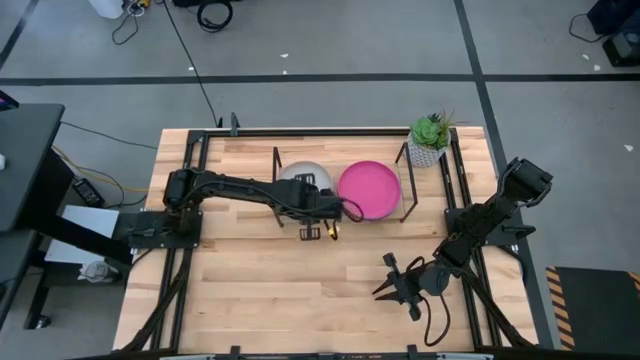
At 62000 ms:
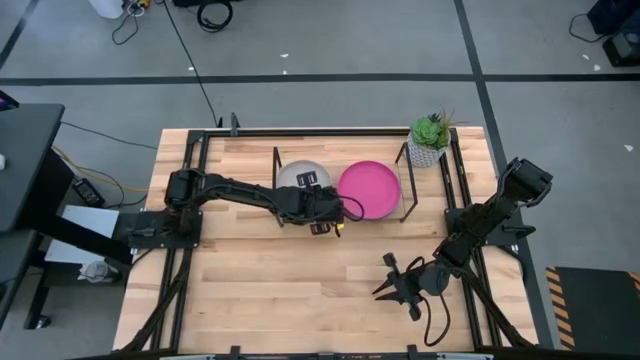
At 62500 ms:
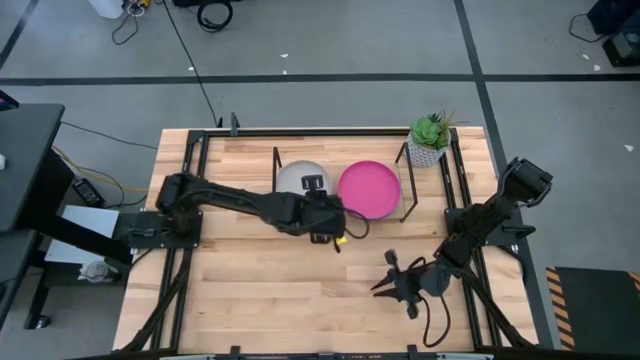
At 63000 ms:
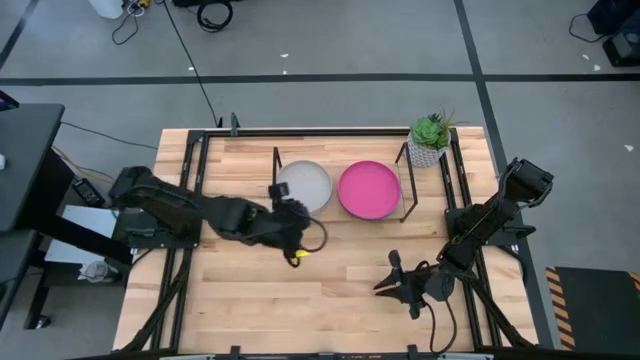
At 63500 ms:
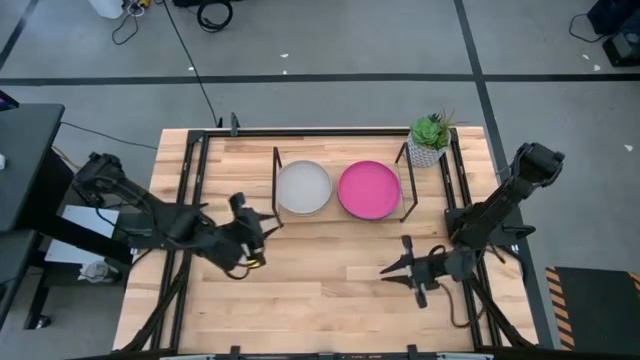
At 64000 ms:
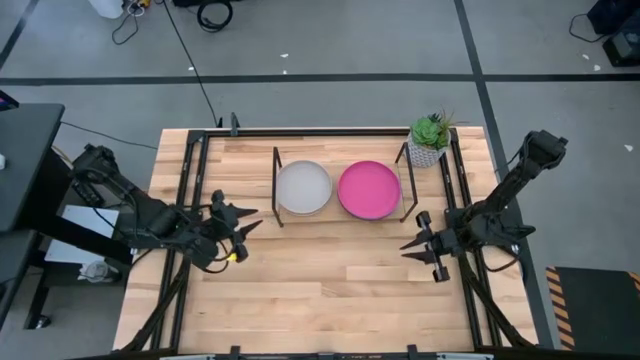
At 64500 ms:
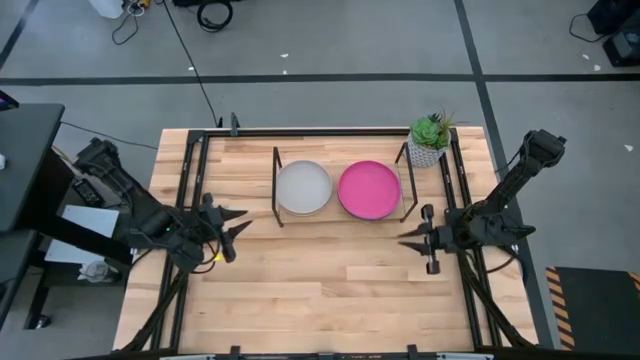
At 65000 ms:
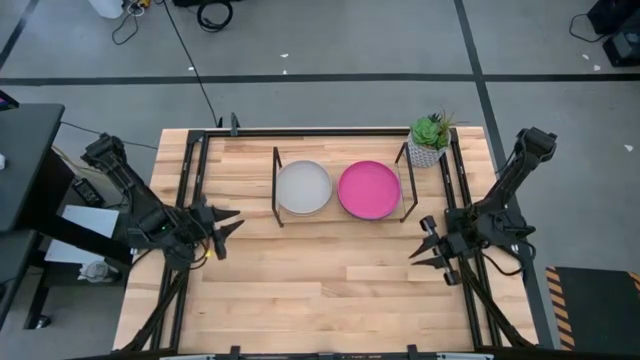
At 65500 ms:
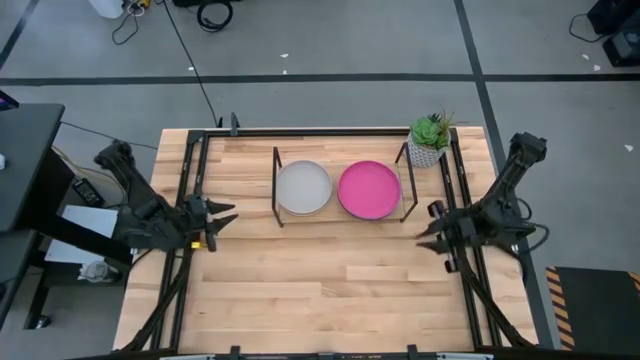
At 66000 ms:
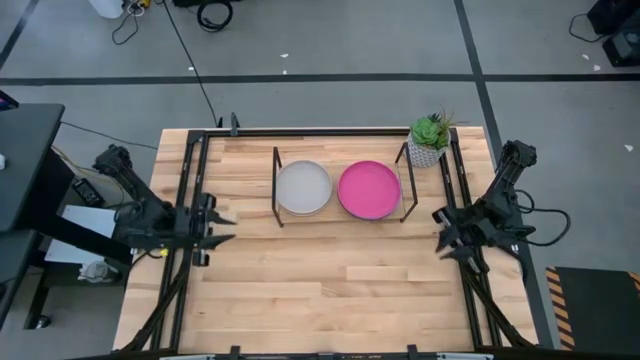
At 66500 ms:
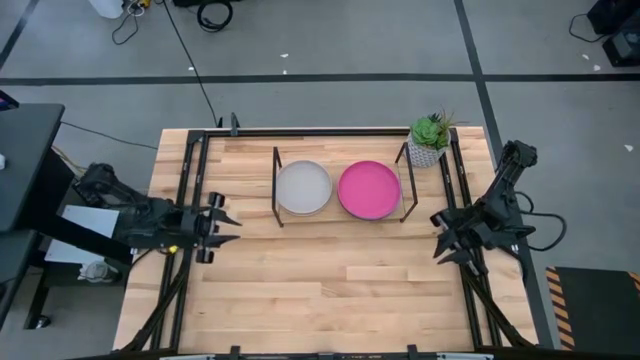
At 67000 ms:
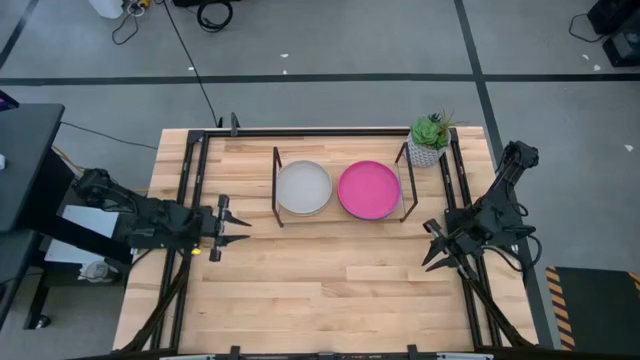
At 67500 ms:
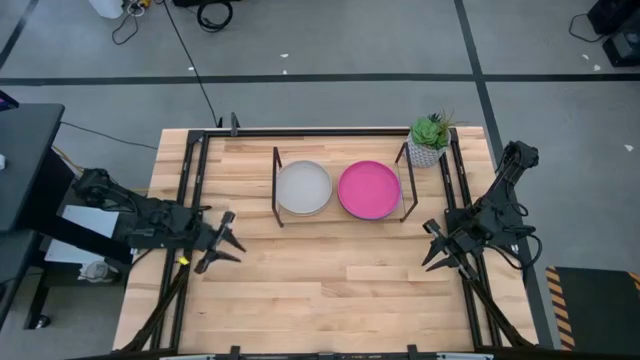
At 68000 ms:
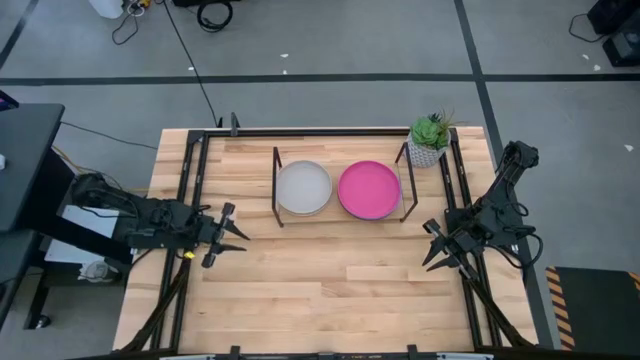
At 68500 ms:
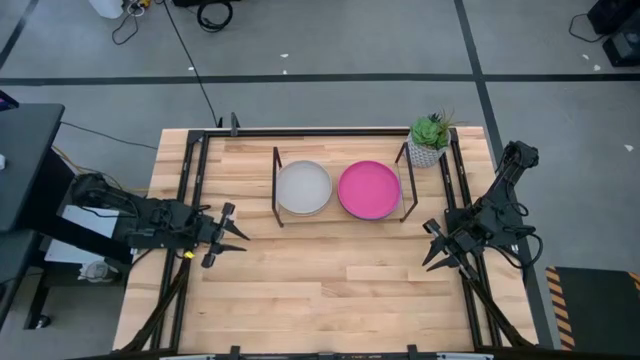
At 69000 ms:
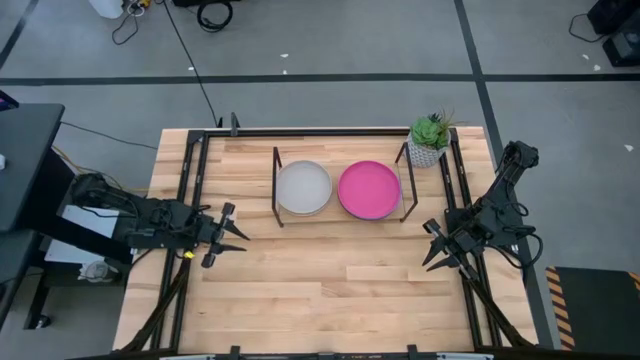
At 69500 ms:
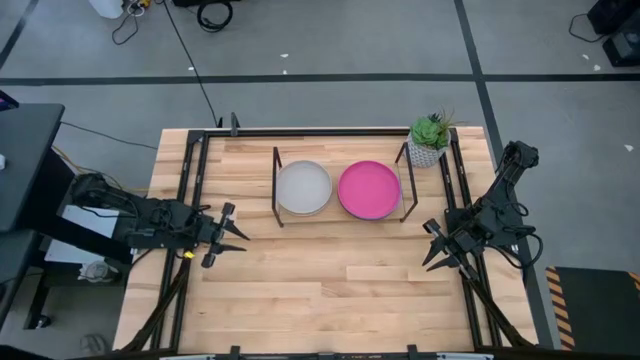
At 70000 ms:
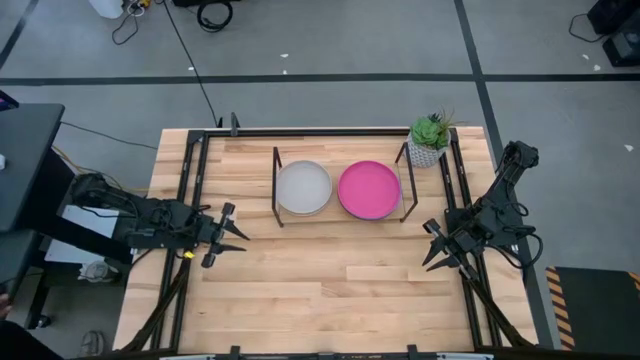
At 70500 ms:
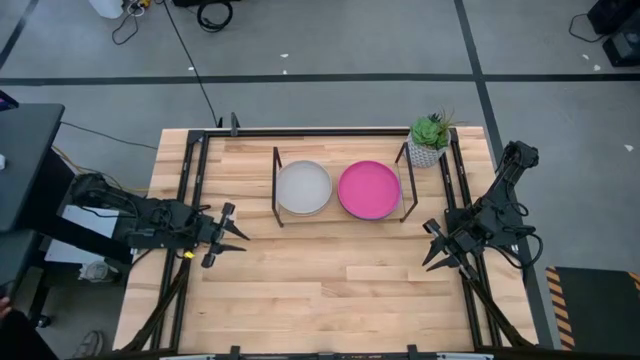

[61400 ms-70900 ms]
Task: Place and stack plates onto a shelf
Return to Home Position

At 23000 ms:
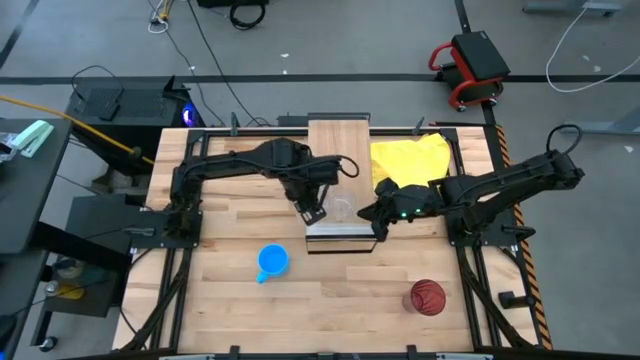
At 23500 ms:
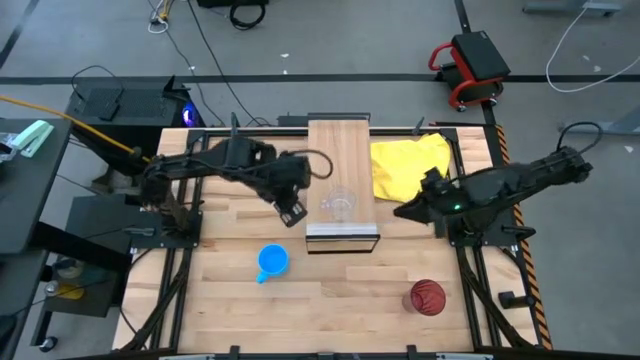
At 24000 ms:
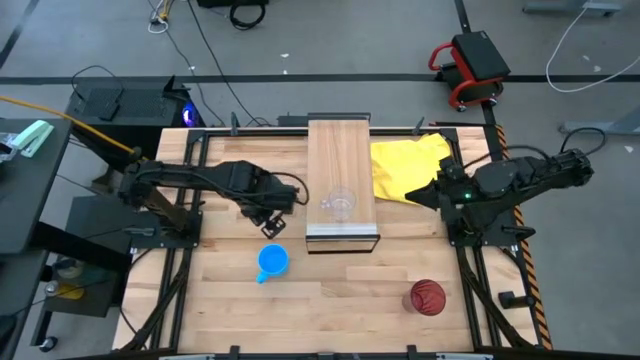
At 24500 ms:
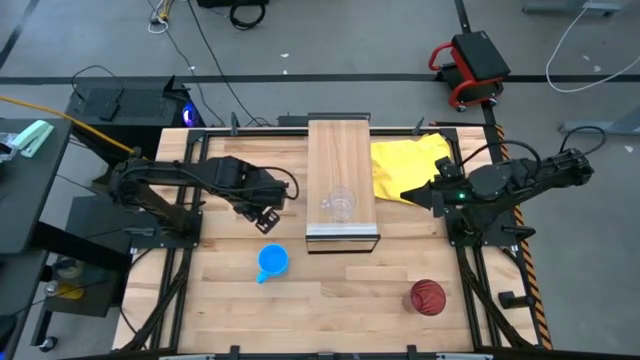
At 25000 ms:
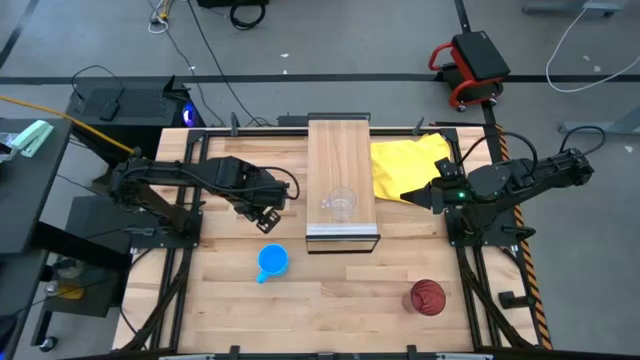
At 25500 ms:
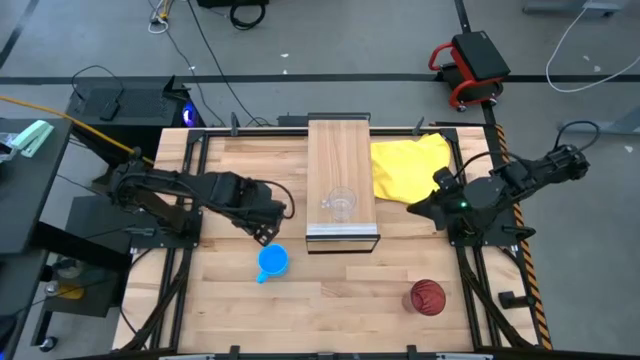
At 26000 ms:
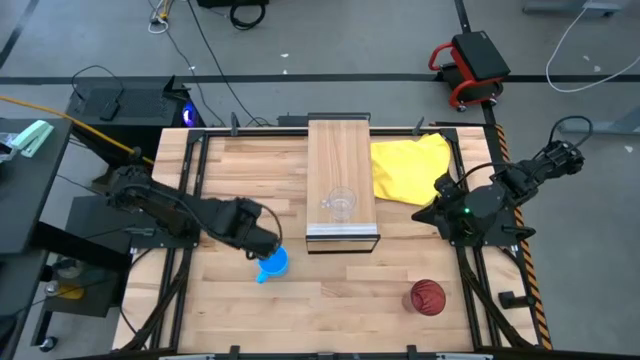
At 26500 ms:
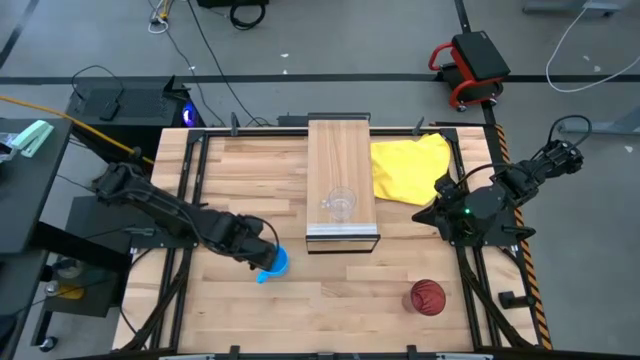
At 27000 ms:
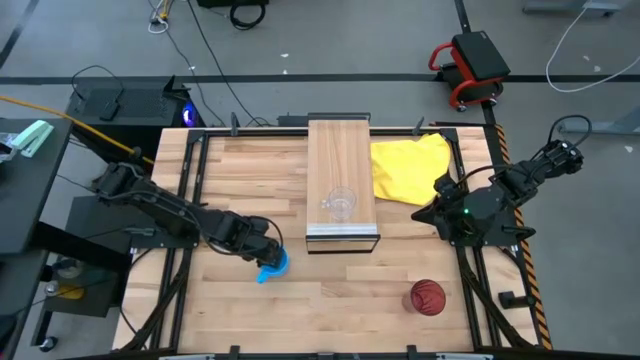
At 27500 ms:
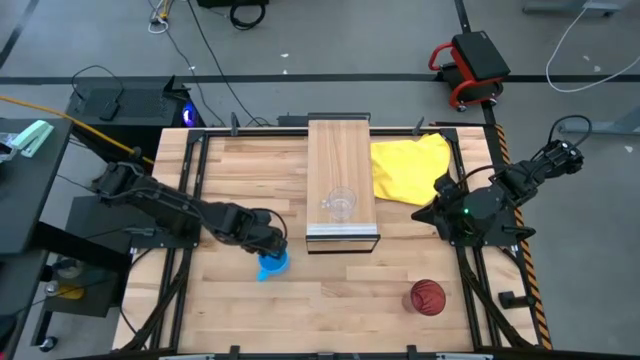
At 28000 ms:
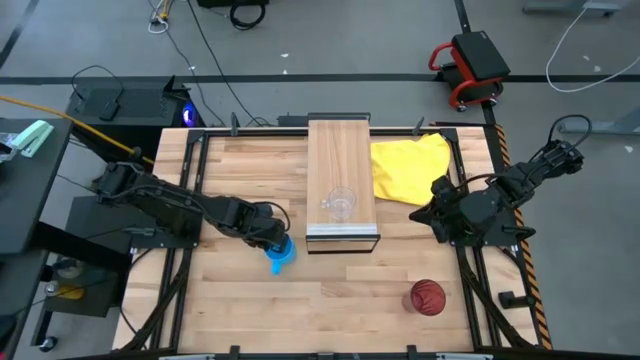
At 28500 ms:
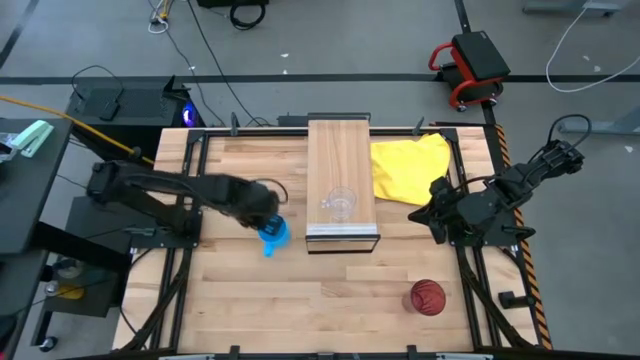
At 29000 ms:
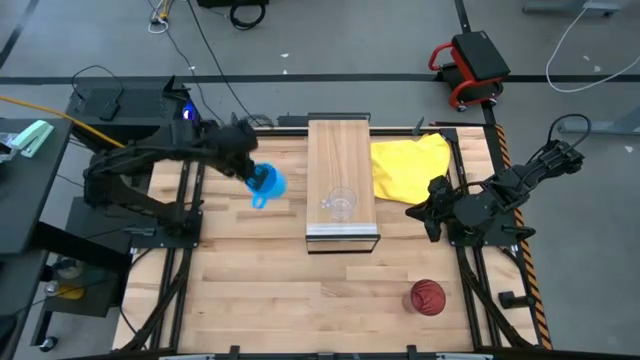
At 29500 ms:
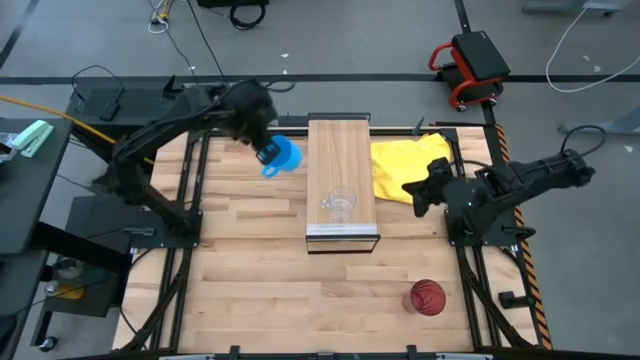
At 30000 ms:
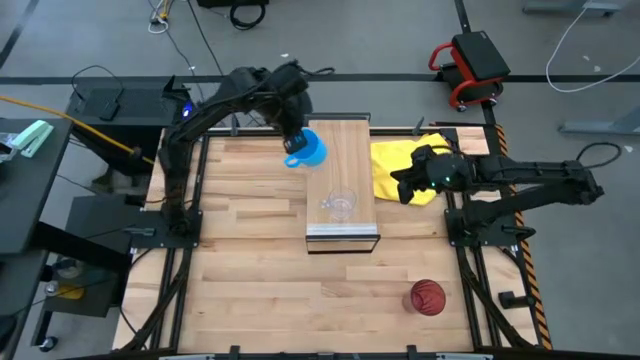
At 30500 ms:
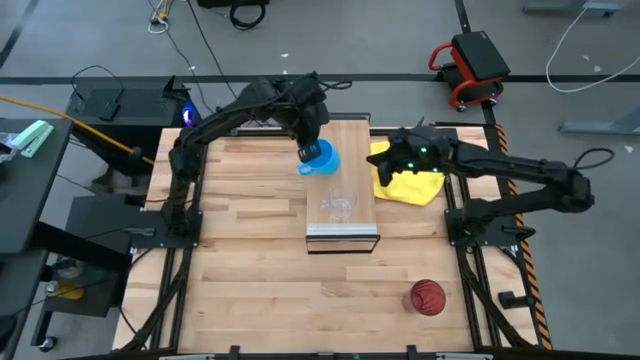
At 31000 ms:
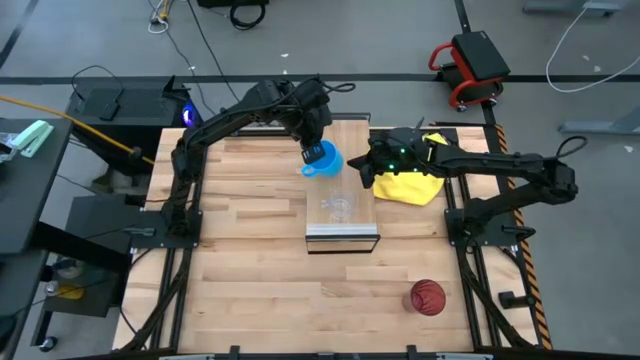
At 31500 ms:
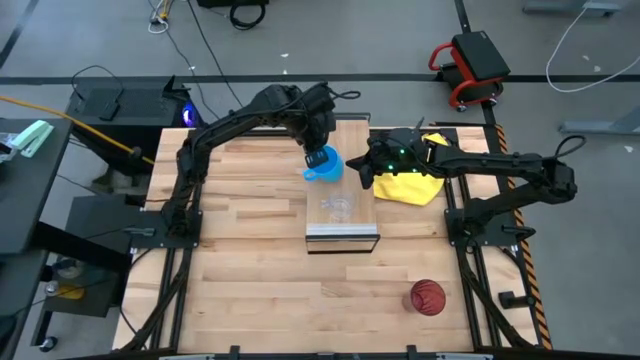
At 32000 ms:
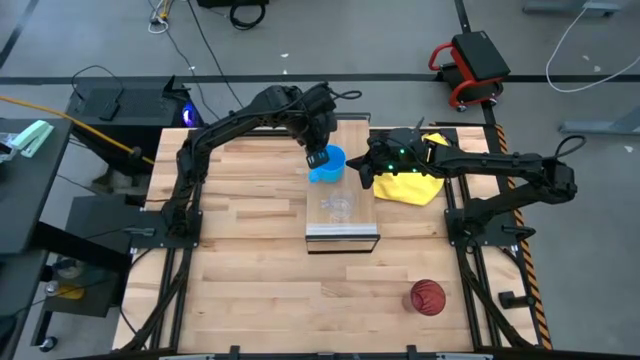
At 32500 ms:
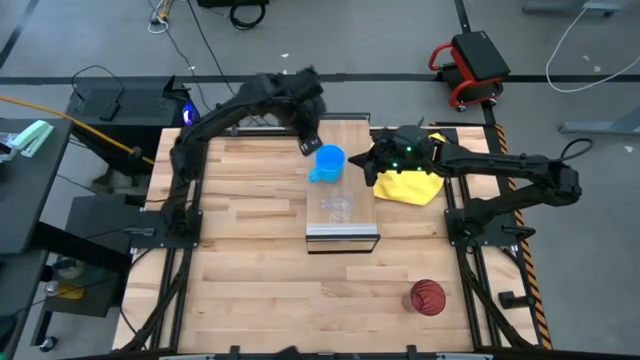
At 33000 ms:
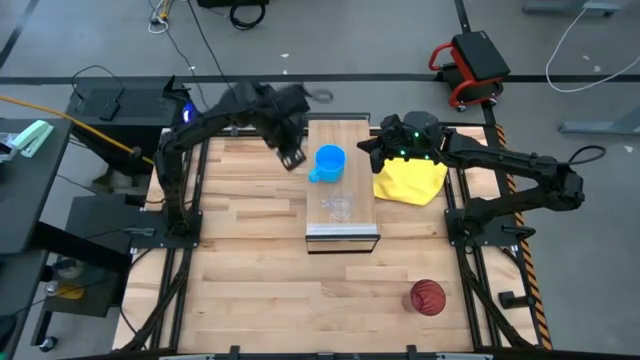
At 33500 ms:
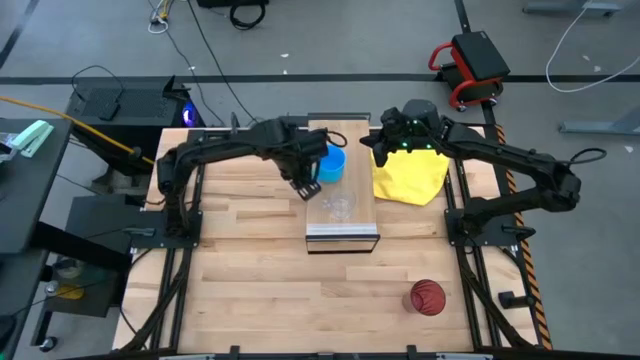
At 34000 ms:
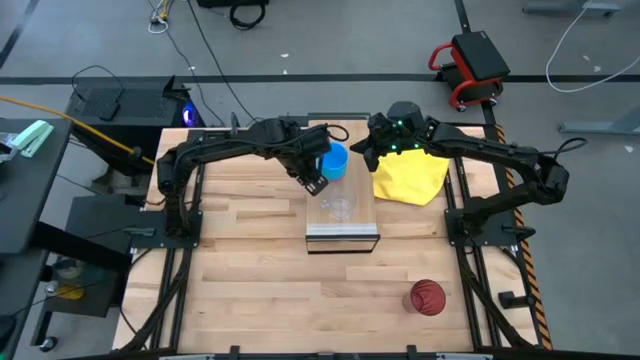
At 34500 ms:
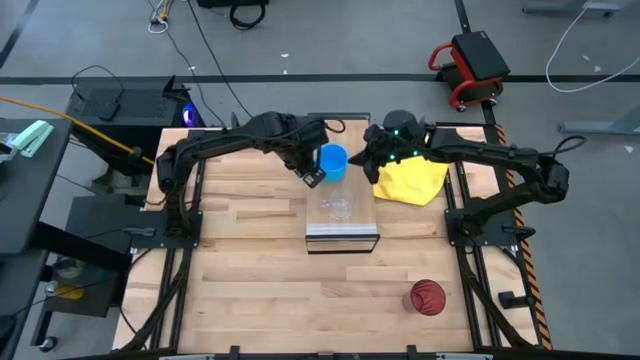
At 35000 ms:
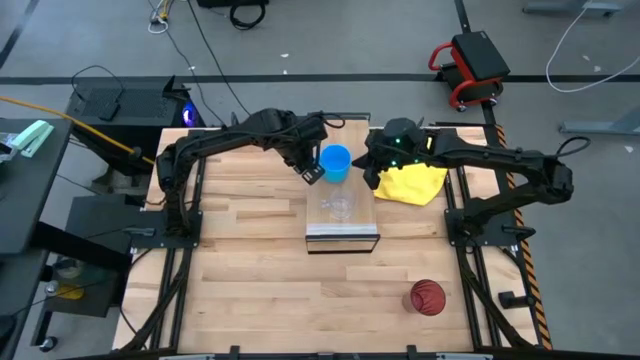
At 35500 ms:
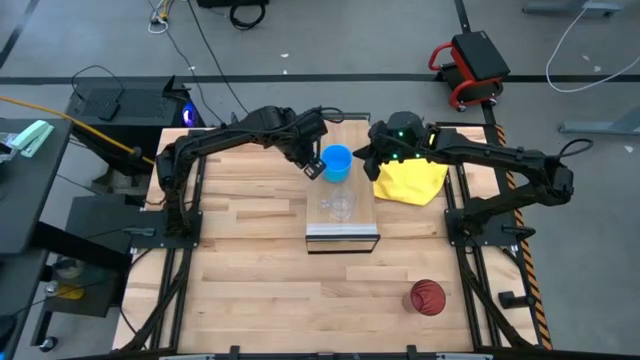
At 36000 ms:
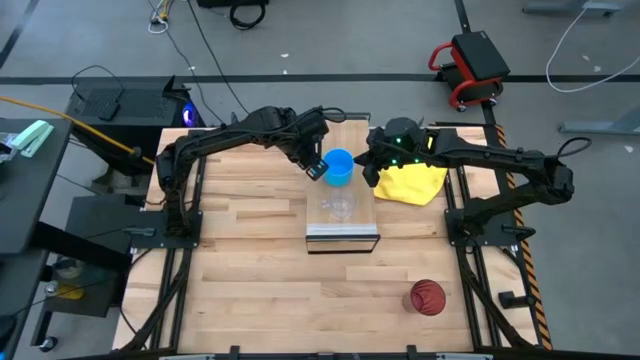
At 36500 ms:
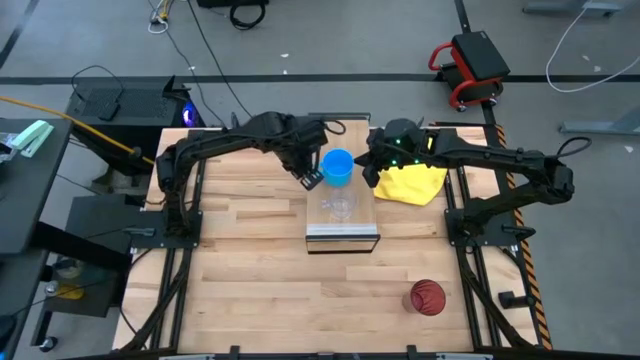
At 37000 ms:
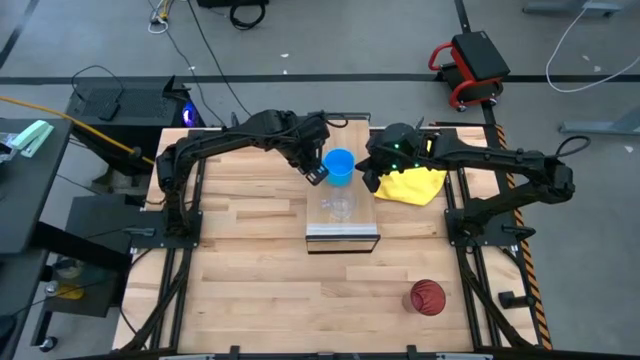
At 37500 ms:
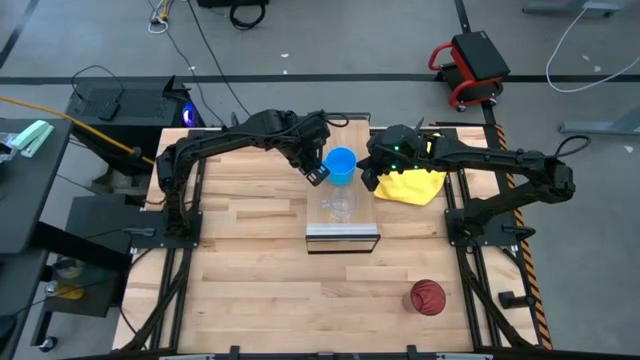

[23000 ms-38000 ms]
Task: Stack small to large cups/mugs on shelf
Put the blue mug on the shelf
